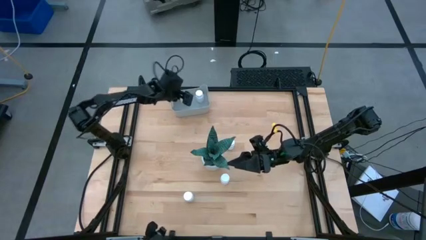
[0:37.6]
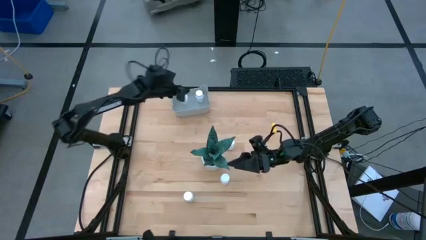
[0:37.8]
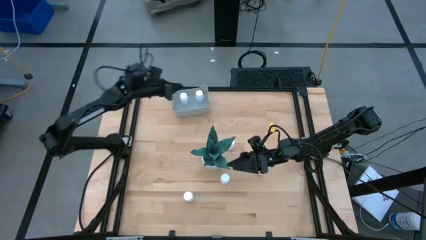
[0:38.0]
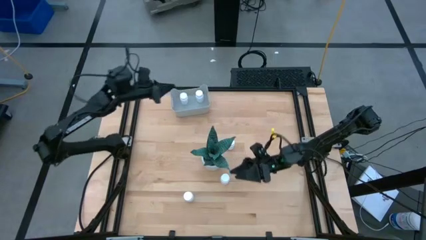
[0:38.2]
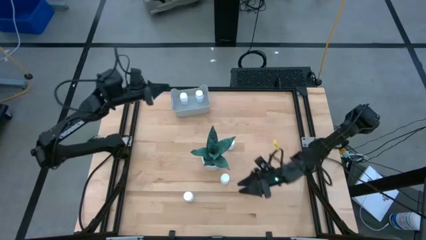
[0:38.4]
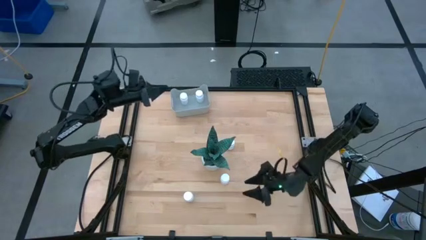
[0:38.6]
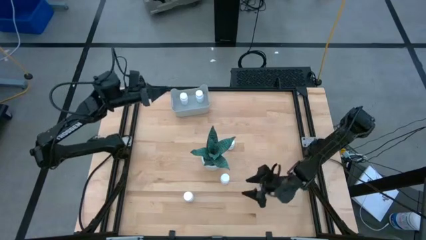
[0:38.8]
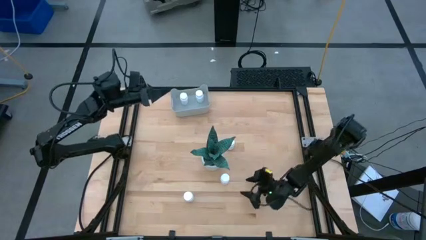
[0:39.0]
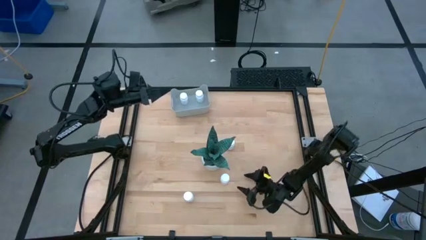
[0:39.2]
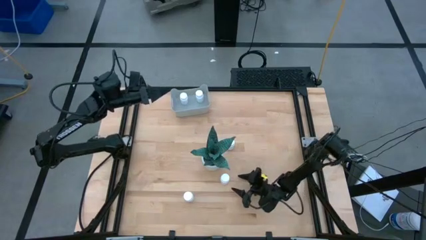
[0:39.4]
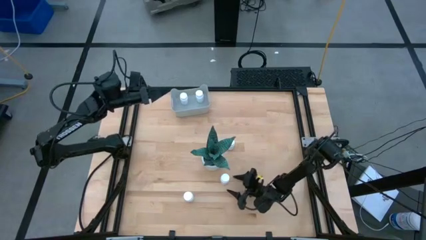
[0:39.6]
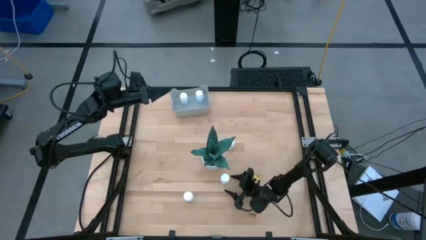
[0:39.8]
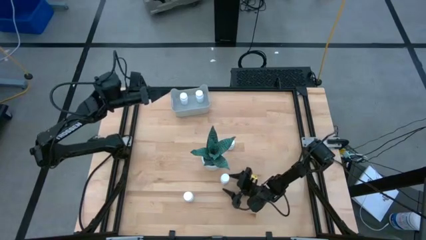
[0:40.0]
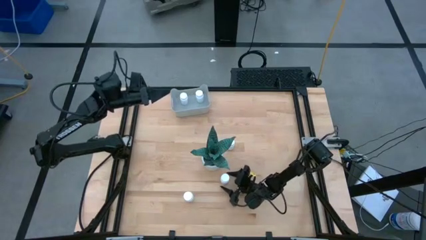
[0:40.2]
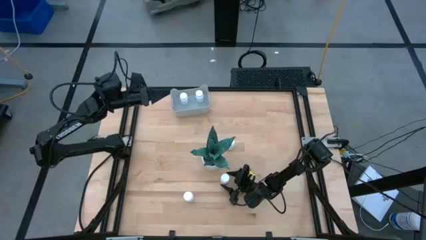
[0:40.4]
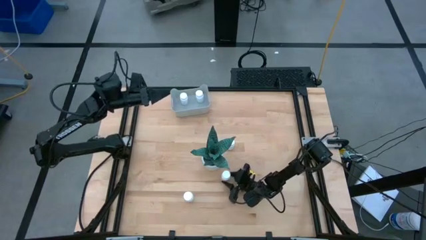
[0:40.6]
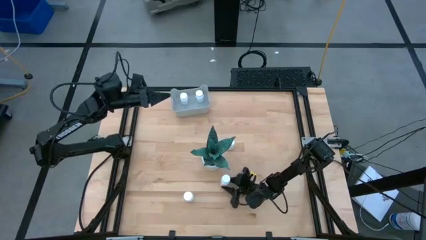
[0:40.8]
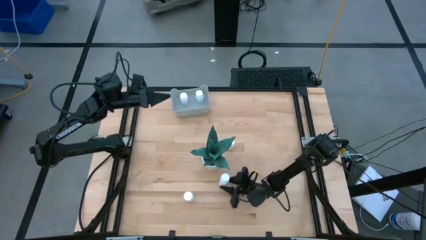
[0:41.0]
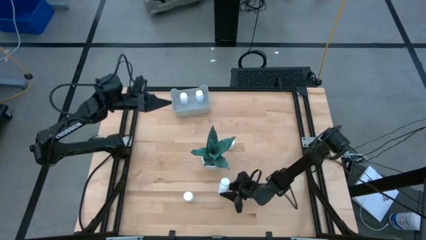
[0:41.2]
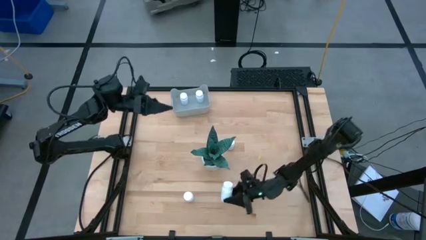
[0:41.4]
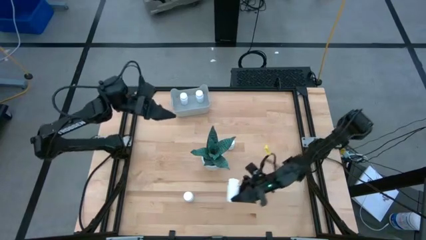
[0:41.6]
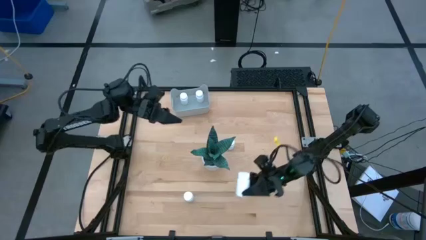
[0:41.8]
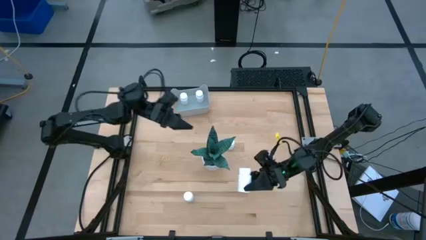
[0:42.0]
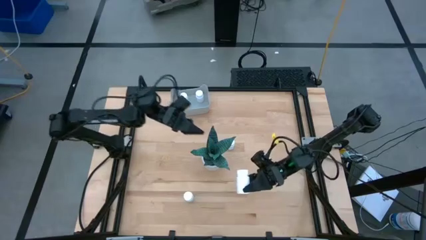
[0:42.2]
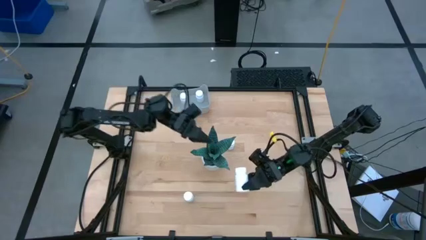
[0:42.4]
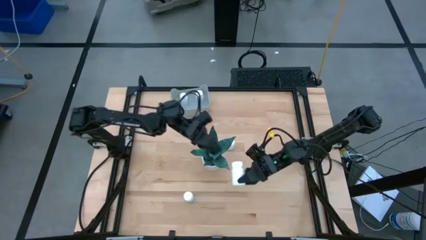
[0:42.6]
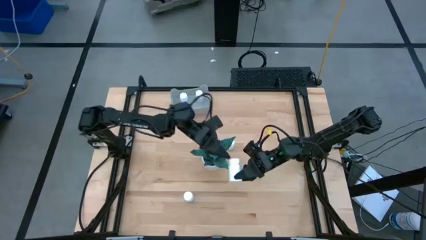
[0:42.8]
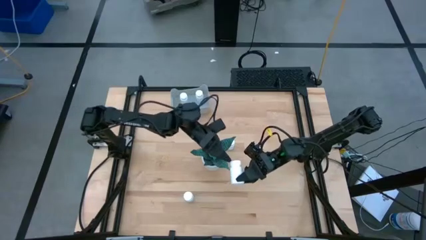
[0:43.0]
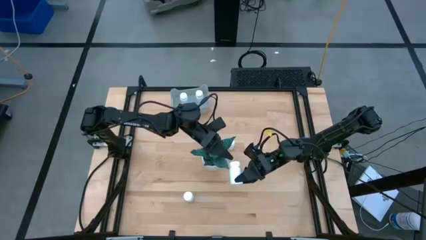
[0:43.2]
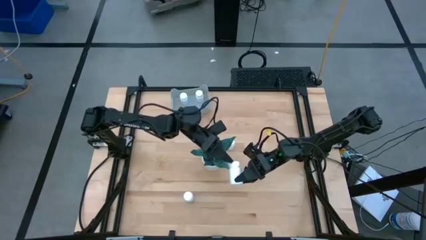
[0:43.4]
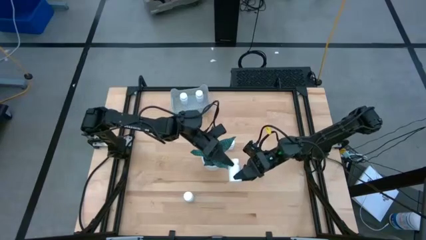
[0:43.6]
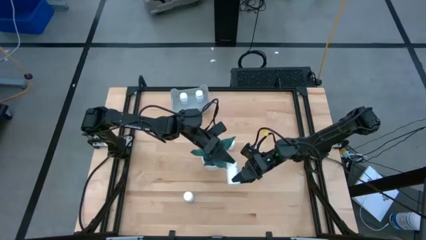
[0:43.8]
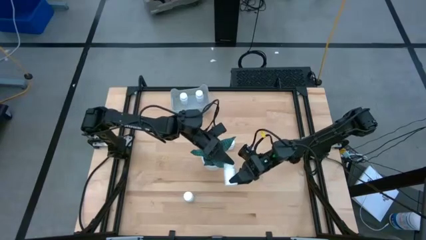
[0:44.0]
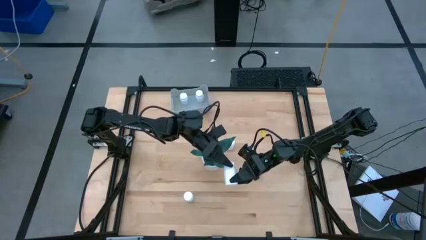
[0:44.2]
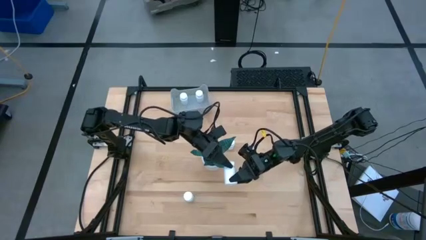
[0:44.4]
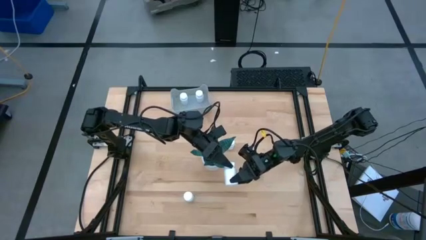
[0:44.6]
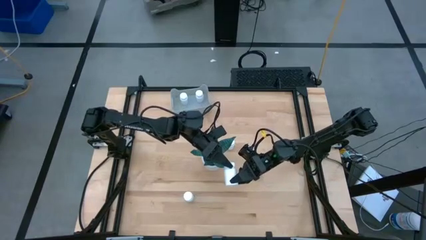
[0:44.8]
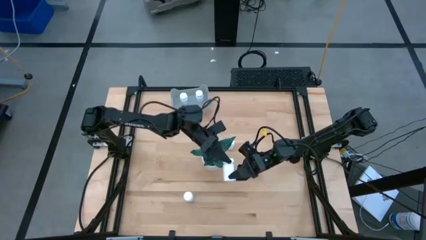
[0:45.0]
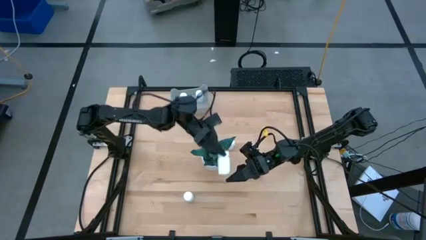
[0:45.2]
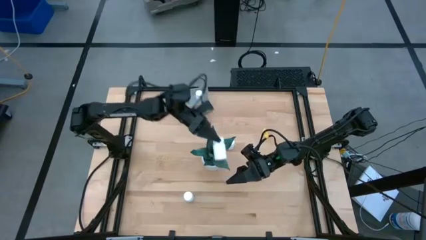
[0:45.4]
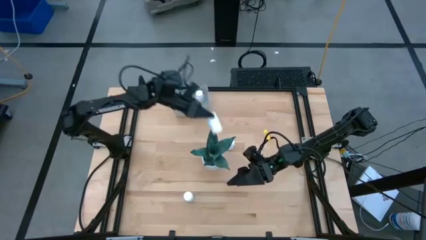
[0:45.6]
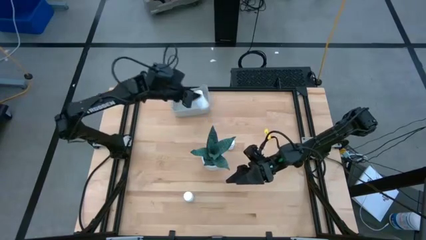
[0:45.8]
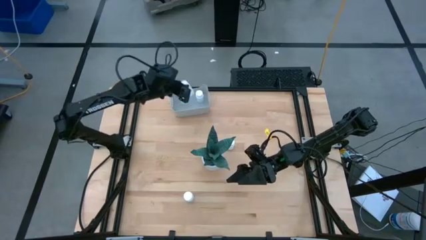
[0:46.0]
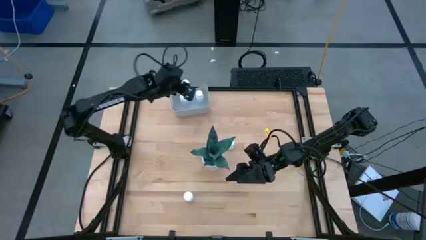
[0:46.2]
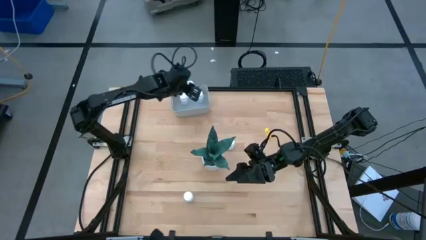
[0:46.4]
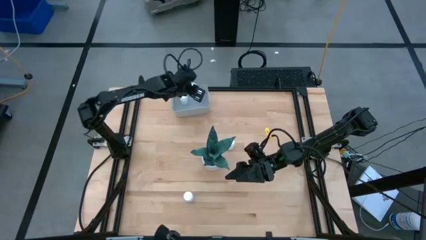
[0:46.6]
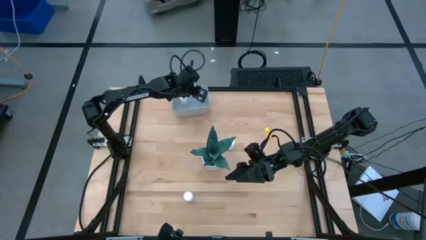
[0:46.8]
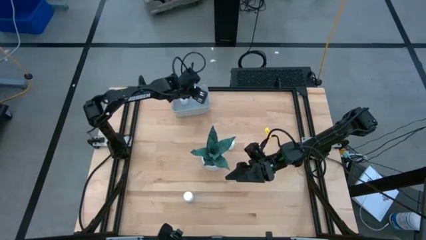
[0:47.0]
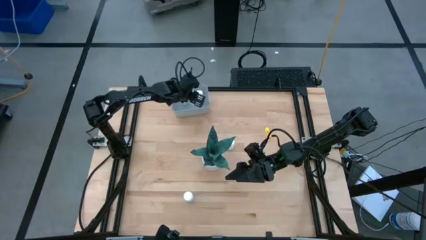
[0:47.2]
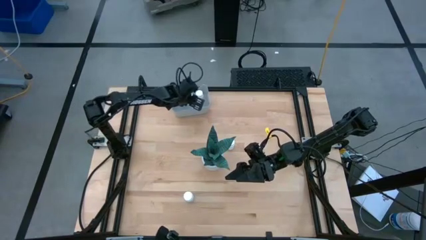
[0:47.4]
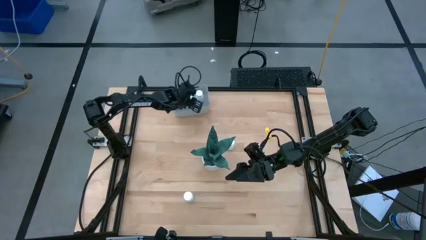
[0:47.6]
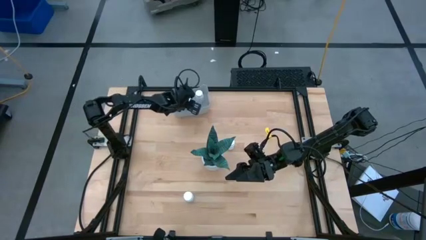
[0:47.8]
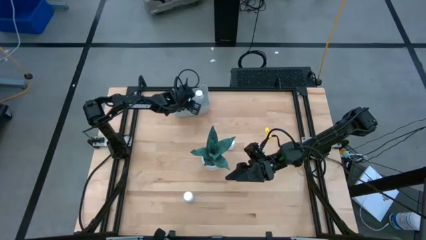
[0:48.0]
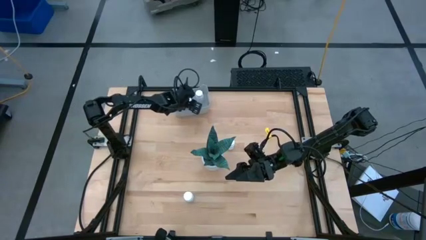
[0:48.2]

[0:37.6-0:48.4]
Task: Pick and place pill bottles into a basket
Put the white medicine bottle into the gray bin

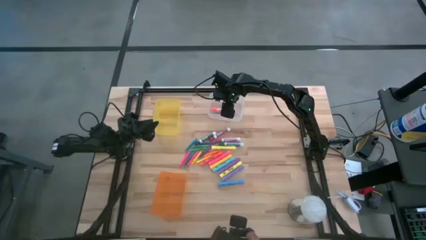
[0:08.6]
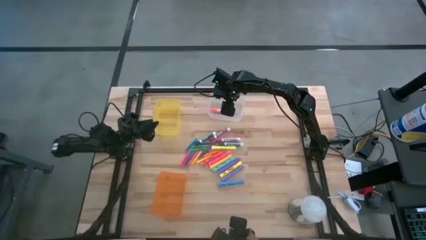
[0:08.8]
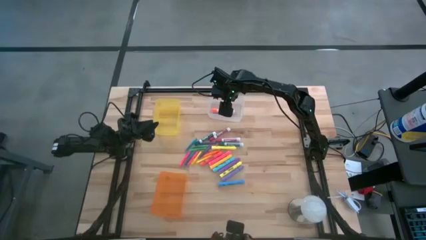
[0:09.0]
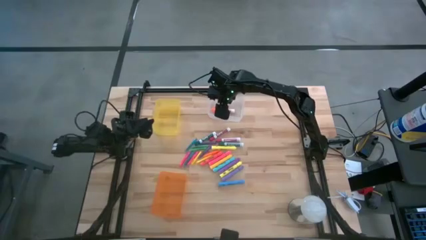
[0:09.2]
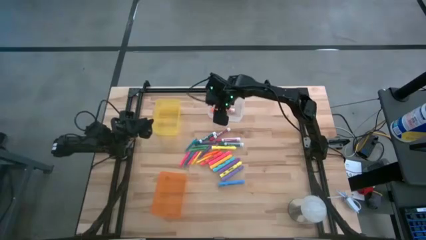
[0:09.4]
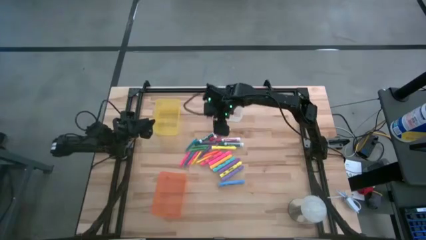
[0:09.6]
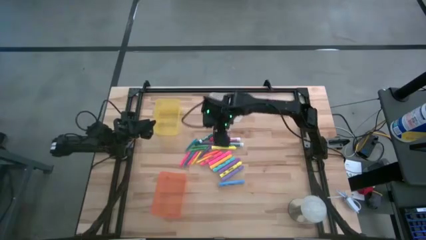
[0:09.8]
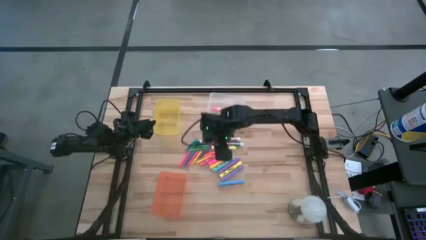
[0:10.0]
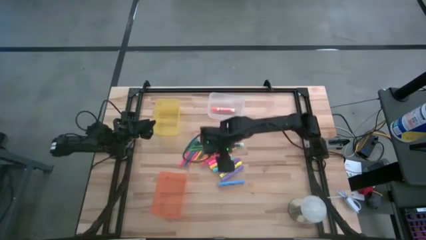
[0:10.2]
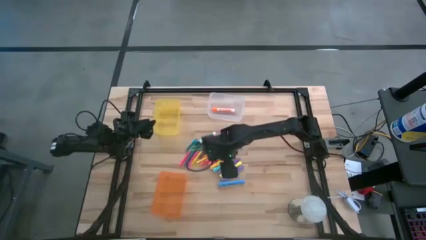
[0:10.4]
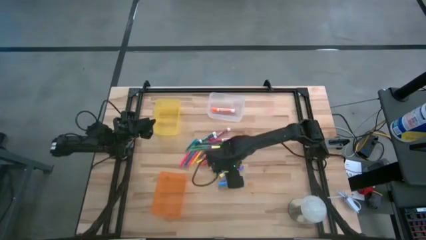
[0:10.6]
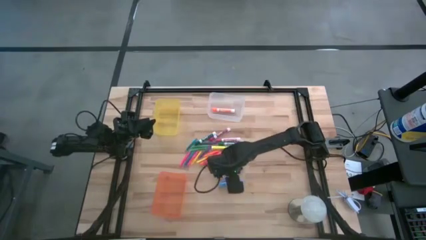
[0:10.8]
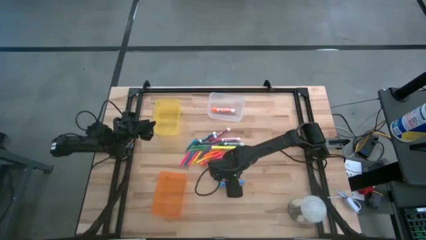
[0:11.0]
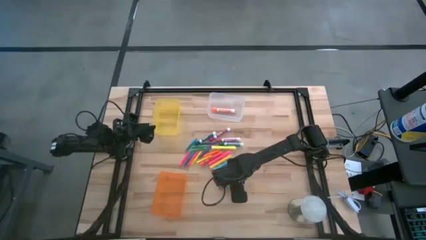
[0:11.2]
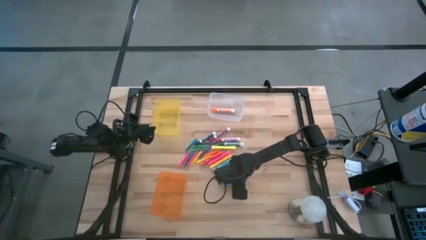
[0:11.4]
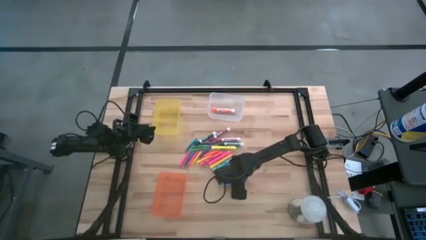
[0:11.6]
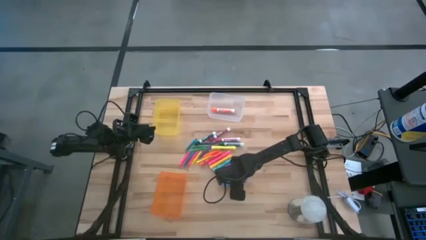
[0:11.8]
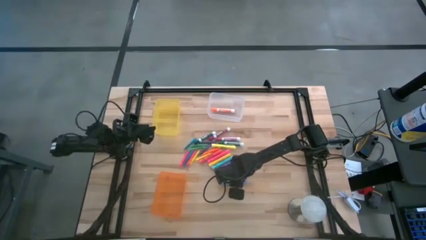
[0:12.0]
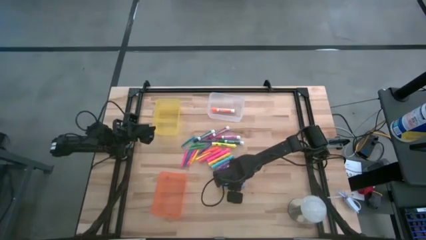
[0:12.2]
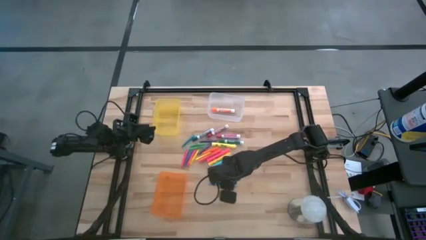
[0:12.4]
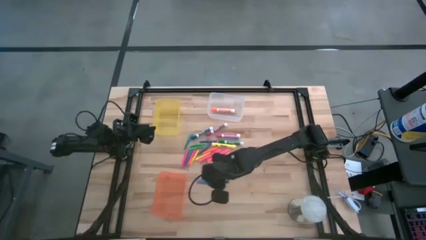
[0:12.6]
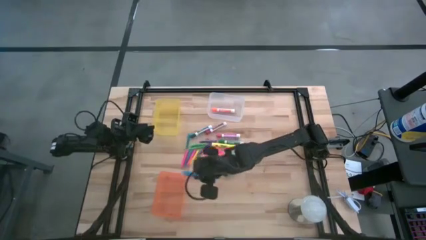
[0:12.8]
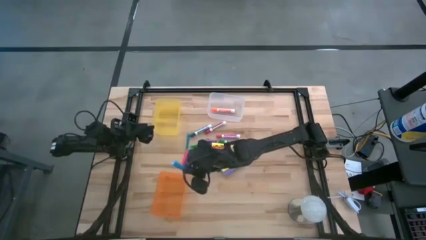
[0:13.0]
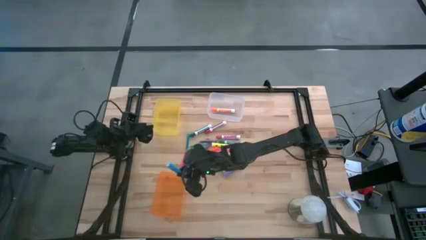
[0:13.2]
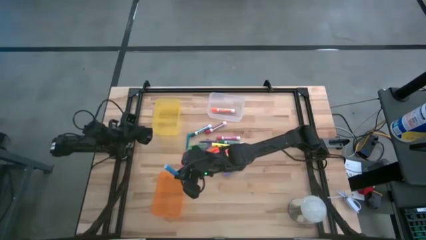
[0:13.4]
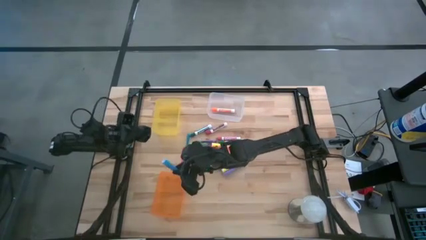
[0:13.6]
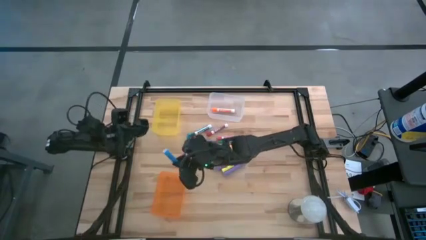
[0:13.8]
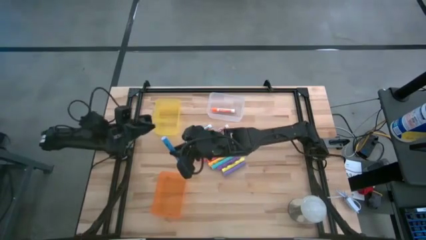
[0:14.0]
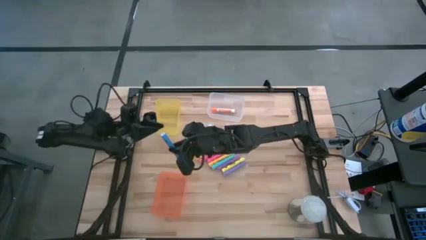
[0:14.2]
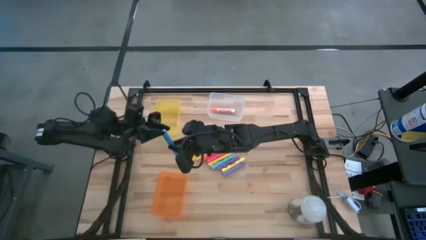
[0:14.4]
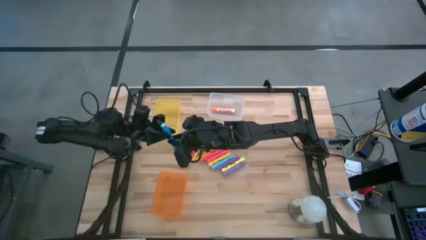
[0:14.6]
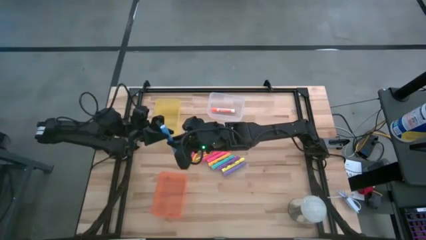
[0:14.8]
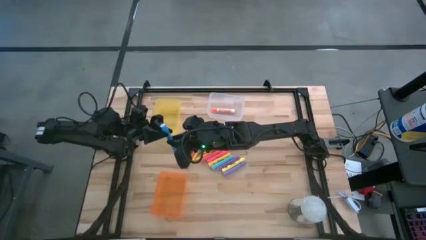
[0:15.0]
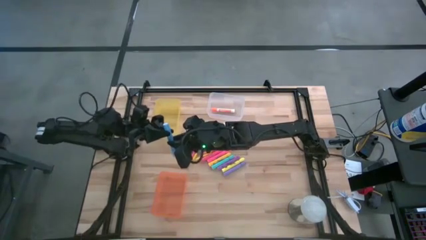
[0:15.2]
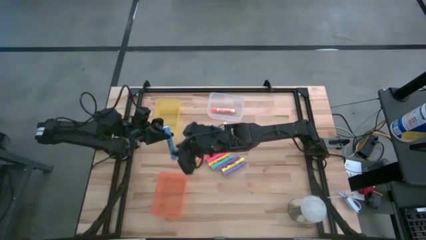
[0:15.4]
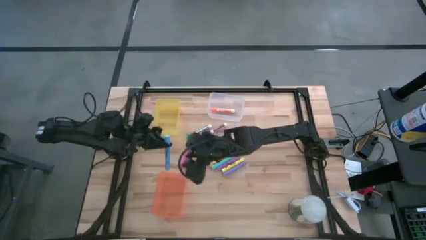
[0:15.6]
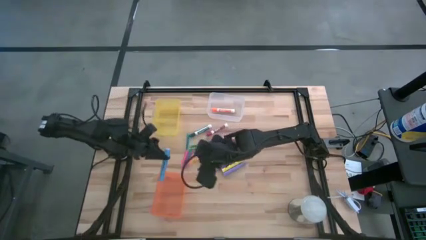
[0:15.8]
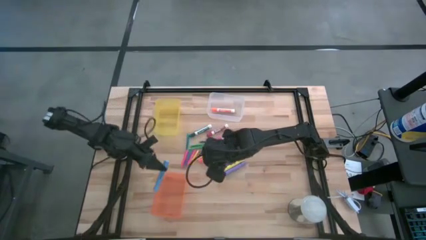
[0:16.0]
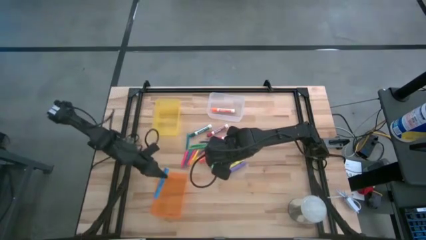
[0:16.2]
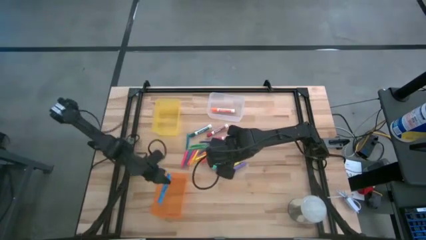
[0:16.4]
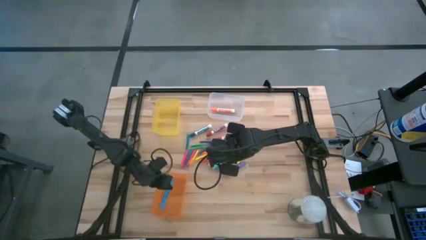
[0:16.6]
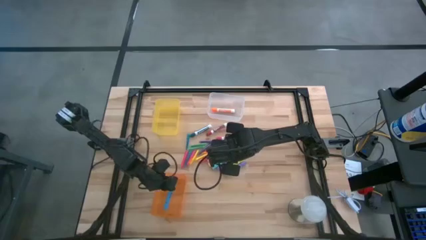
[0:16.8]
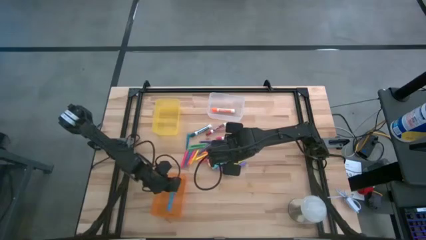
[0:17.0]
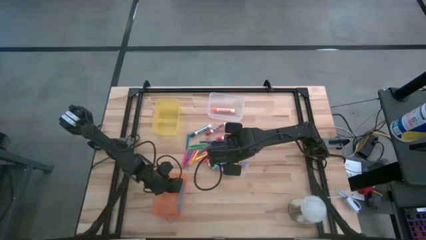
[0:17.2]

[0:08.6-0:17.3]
Task: Pick & Place Markers
Put the blue highlighter into the orange bin
